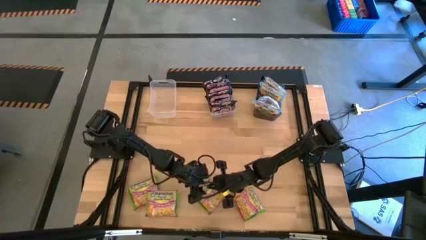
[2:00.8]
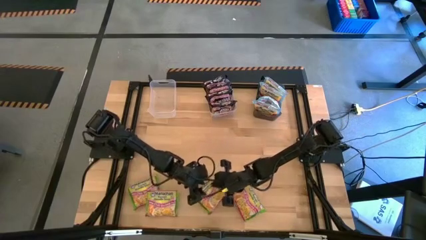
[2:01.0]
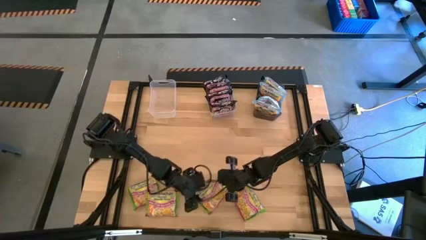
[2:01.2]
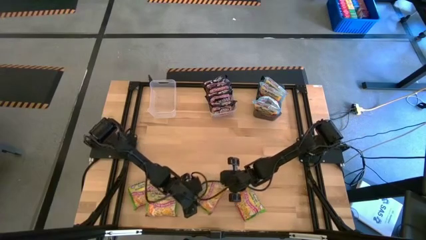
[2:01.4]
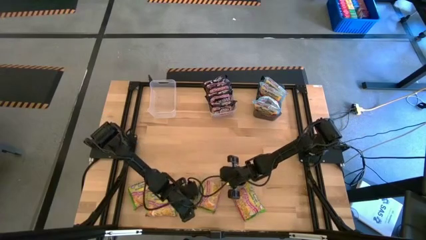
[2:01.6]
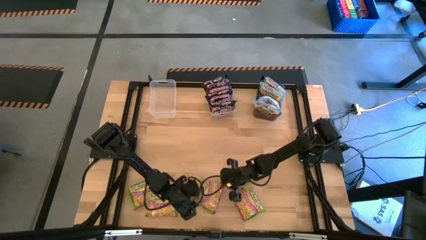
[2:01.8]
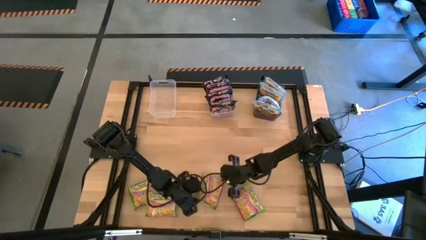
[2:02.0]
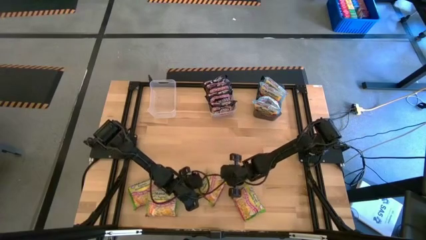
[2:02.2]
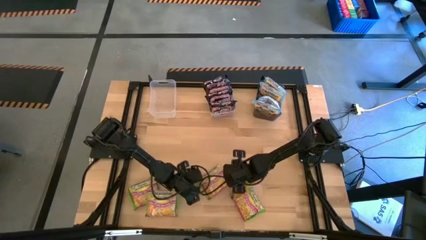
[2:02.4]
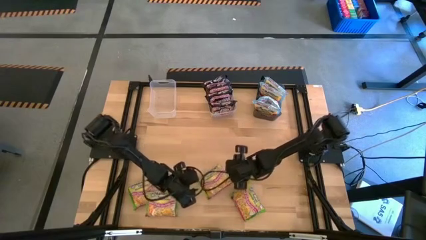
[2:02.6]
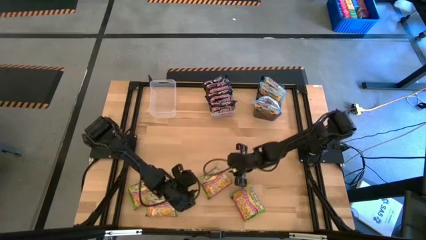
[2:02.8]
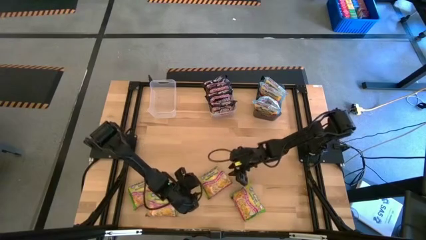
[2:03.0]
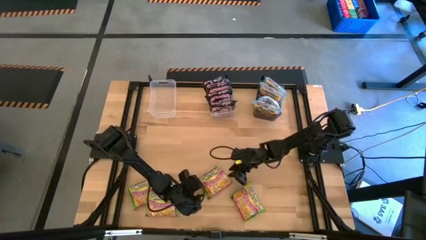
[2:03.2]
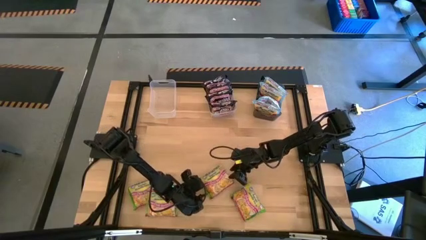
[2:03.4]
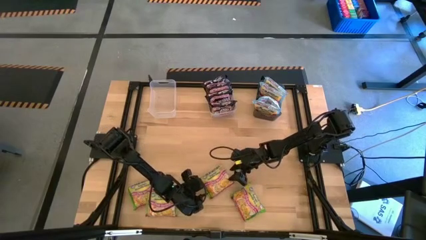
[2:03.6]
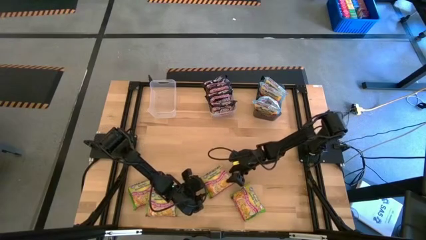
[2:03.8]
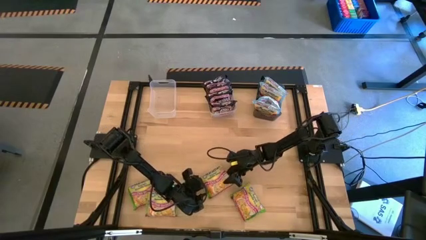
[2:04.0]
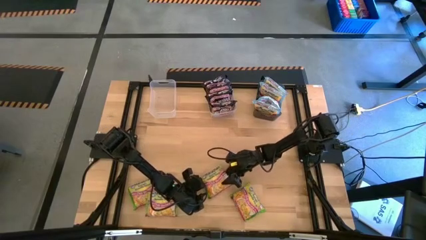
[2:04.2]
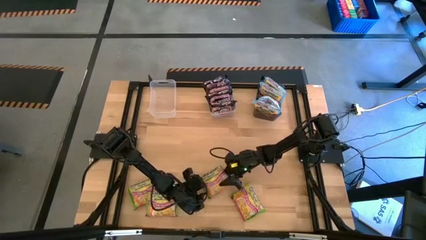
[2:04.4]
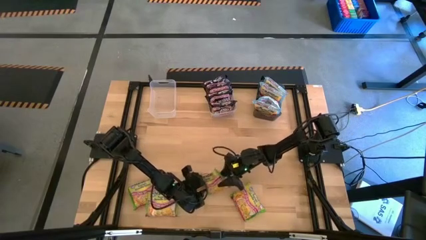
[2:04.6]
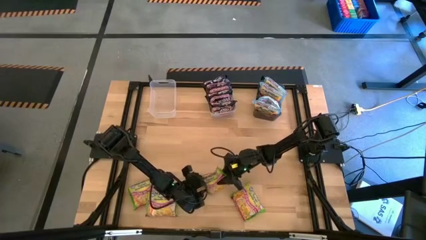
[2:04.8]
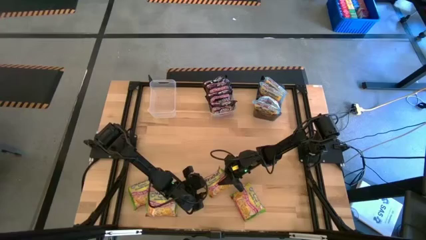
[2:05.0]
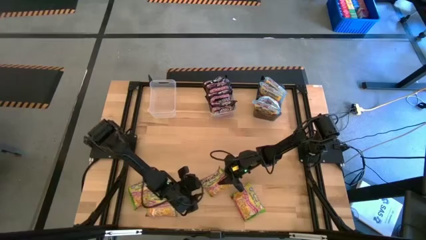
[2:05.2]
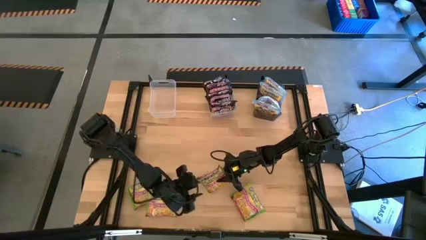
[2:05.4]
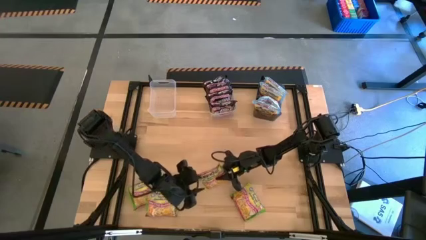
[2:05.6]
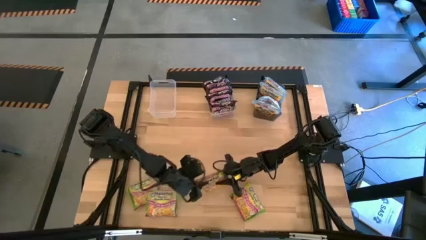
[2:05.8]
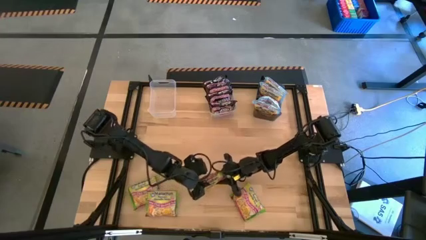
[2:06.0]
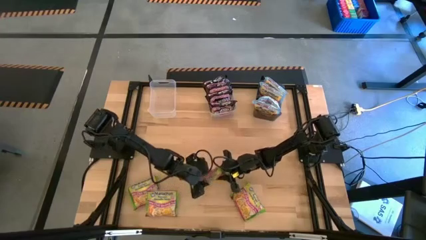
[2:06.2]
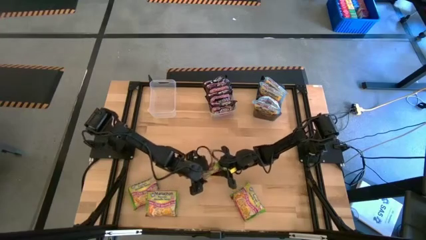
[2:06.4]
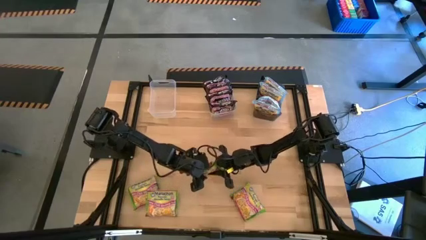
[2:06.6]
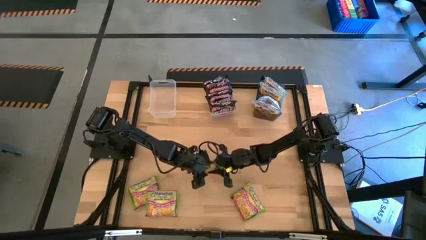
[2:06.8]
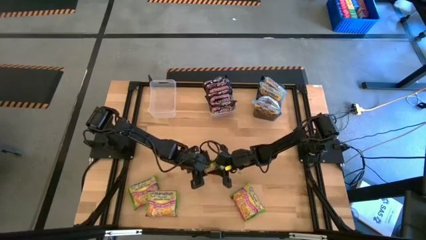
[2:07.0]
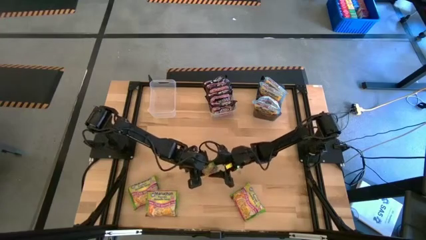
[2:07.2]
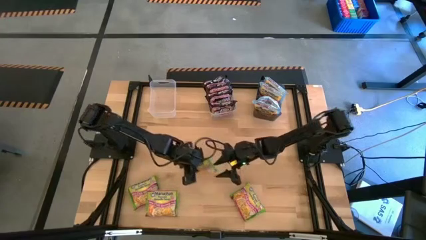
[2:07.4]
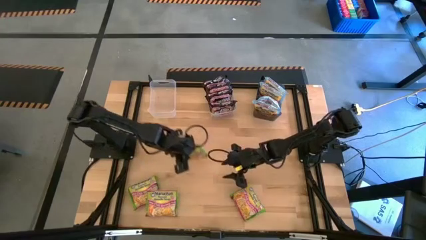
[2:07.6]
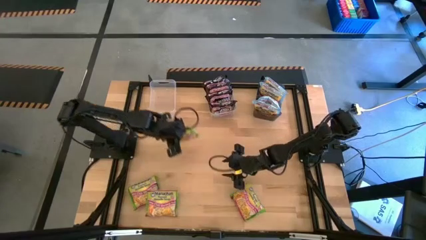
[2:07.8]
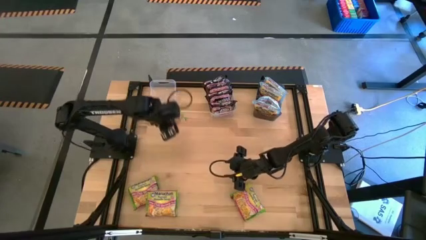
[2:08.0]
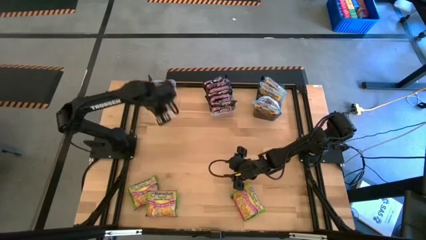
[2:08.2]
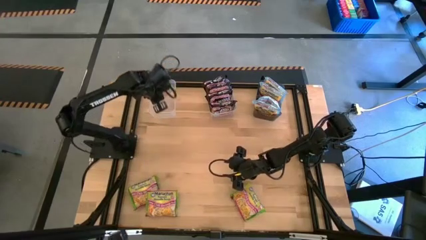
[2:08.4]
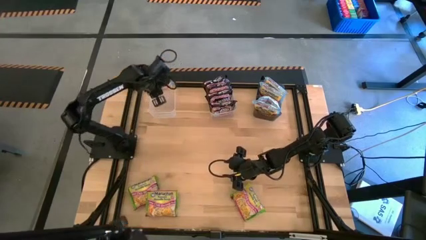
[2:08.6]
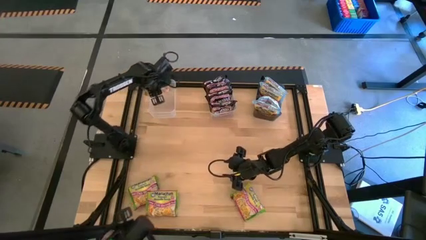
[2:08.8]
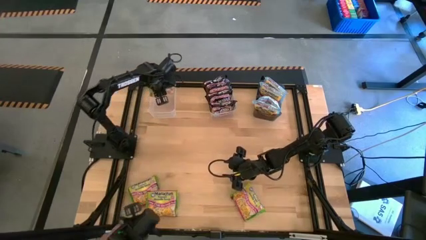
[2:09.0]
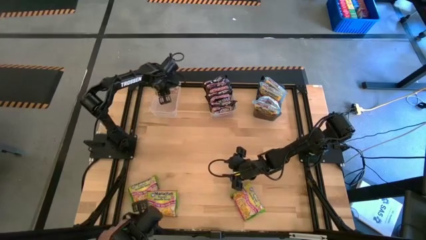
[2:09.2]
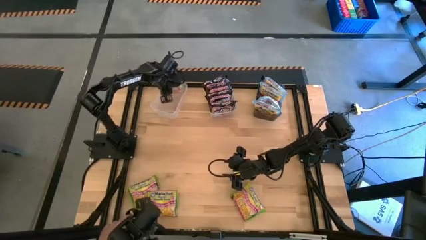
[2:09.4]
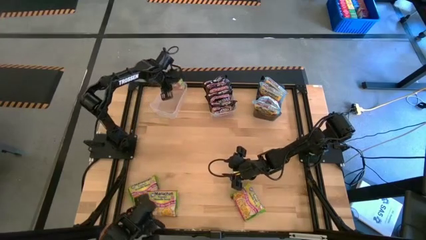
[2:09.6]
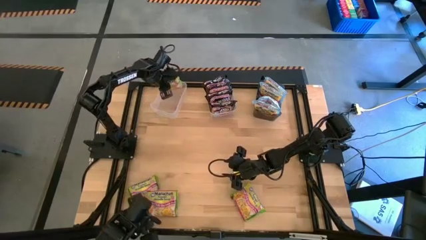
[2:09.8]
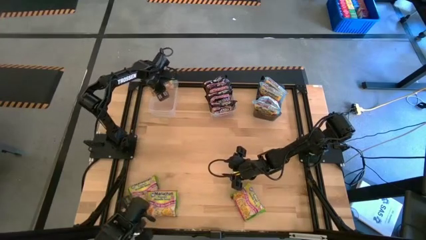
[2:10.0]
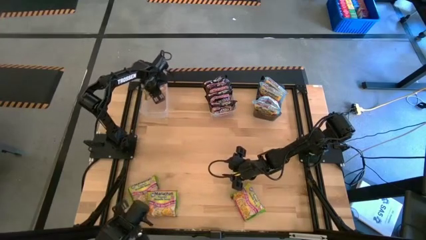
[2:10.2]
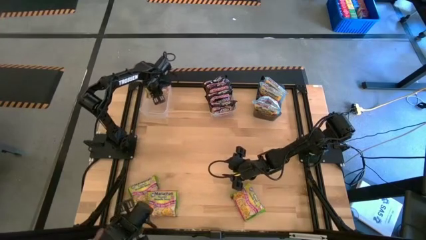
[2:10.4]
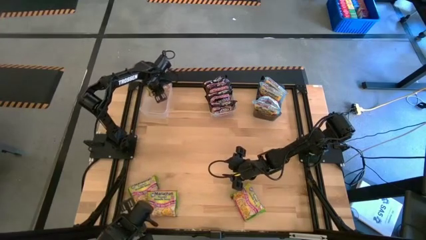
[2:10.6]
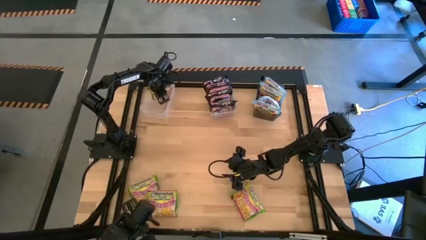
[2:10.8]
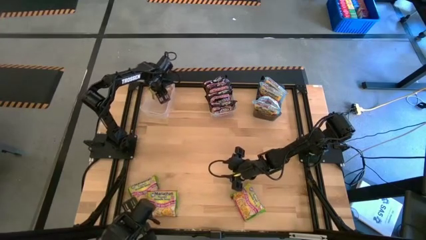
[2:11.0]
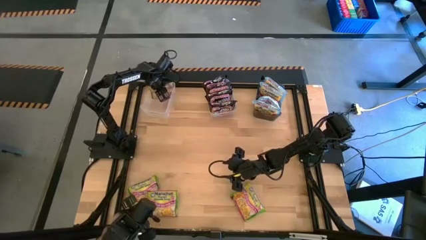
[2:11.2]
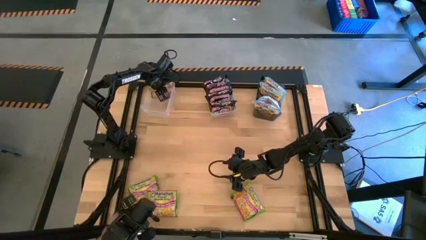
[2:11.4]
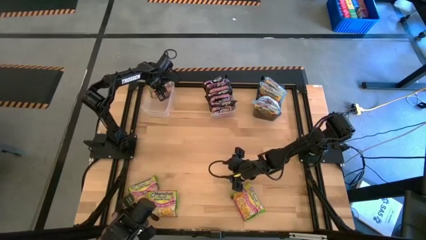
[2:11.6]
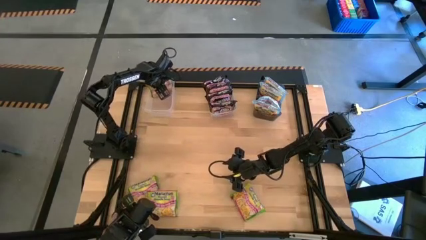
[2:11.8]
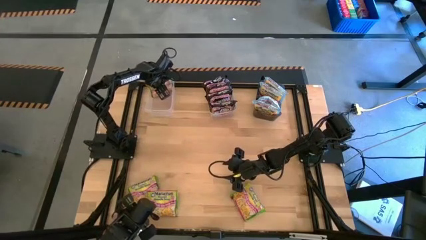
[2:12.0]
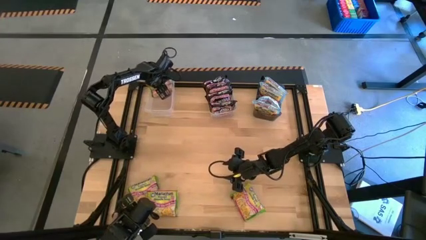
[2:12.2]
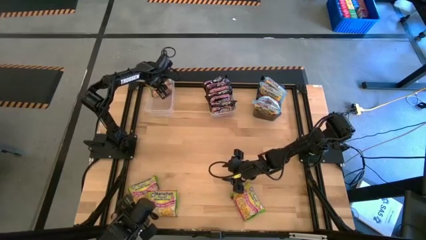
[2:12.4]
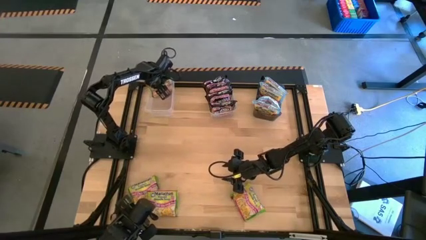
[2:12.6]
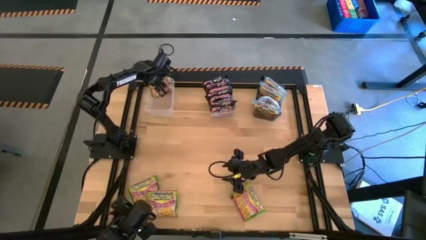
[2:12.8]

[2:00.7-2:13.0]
Task: Sort Maruchan noodles
Put the green noodle pack into the left transparent bin
